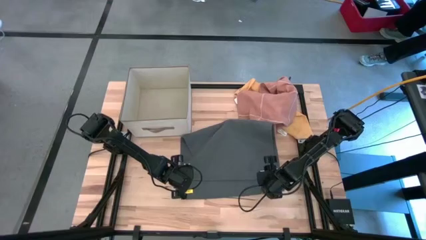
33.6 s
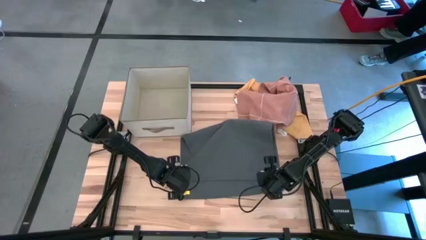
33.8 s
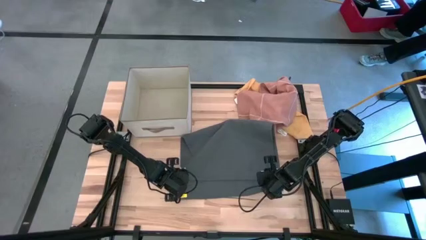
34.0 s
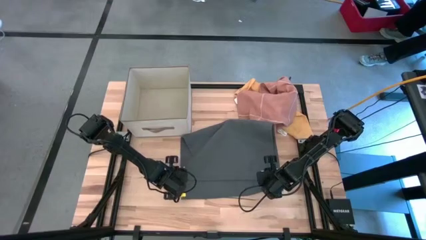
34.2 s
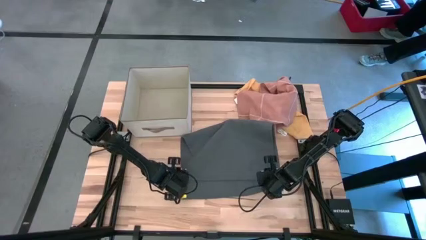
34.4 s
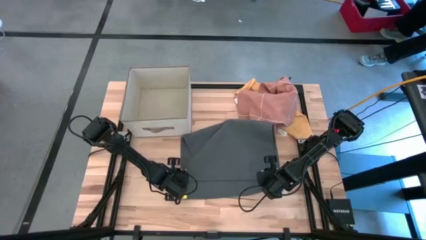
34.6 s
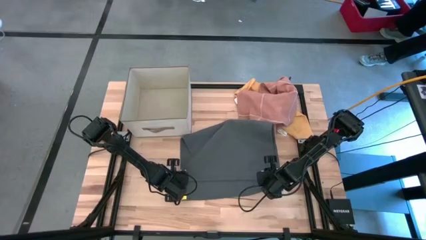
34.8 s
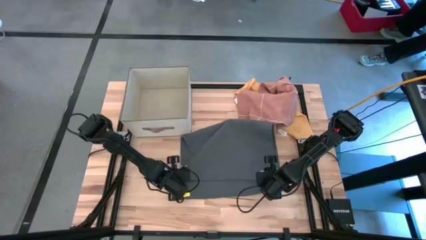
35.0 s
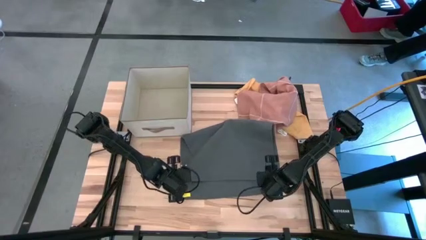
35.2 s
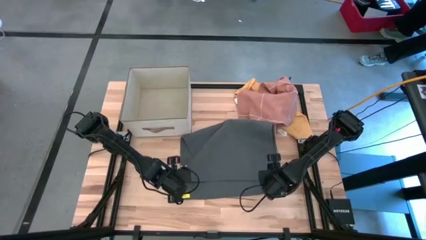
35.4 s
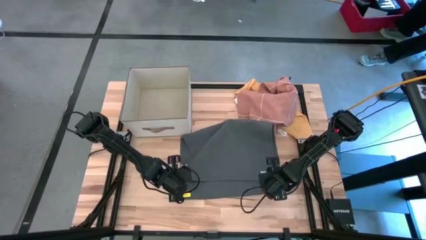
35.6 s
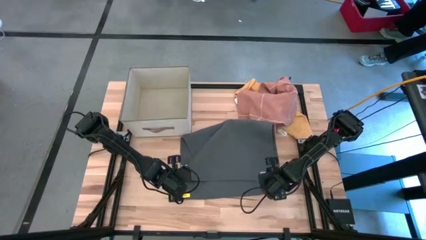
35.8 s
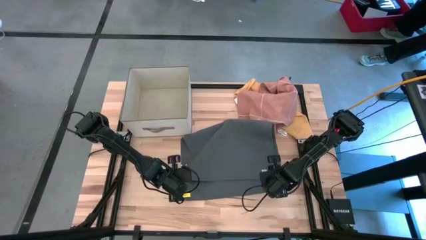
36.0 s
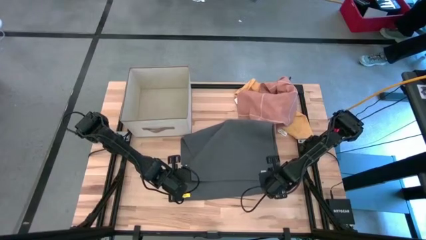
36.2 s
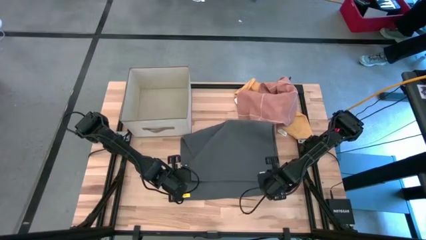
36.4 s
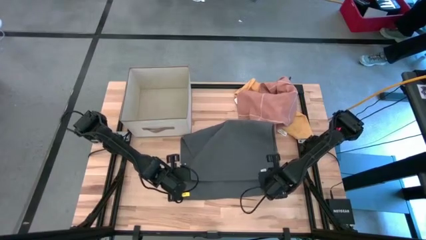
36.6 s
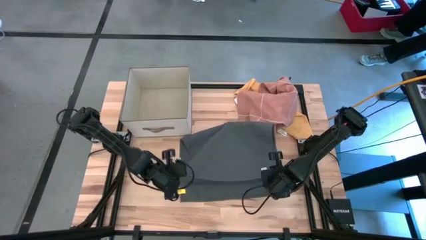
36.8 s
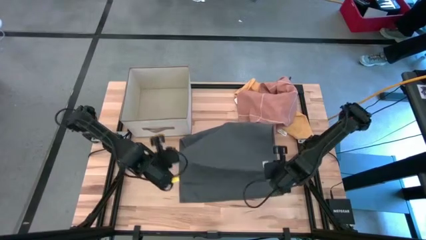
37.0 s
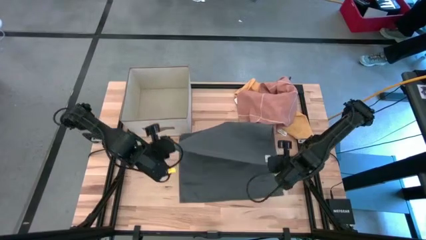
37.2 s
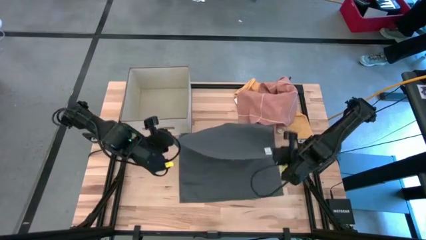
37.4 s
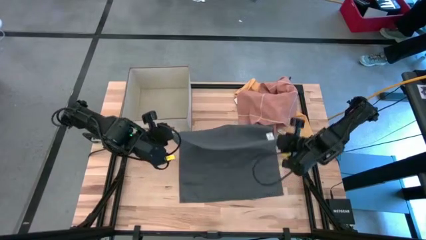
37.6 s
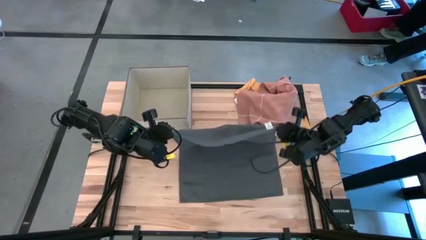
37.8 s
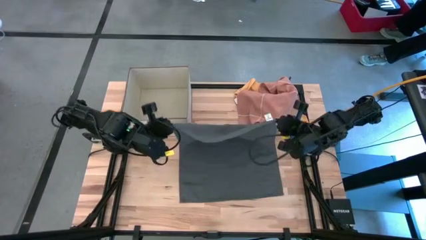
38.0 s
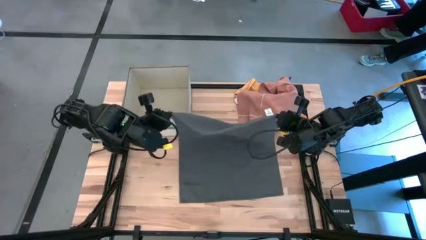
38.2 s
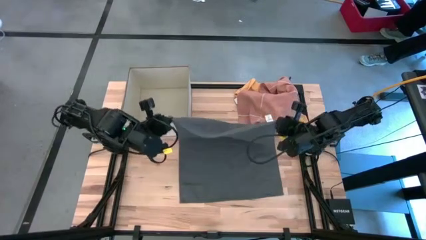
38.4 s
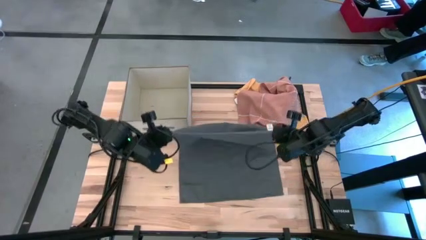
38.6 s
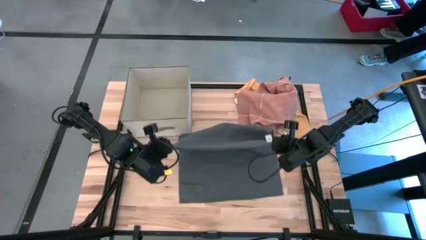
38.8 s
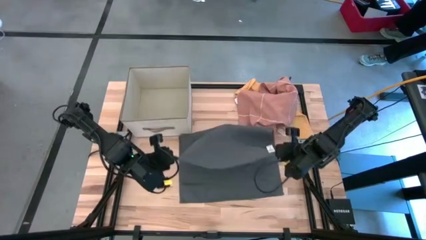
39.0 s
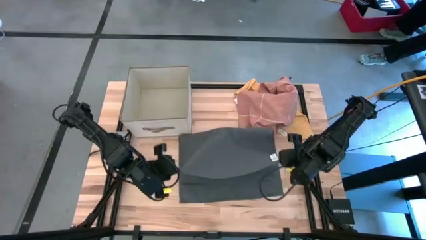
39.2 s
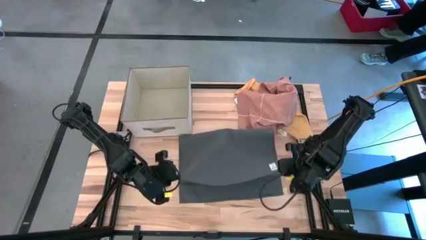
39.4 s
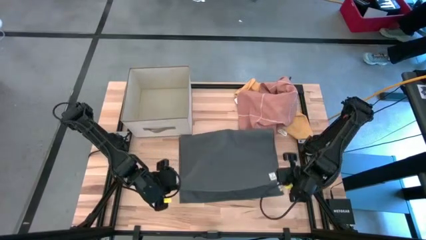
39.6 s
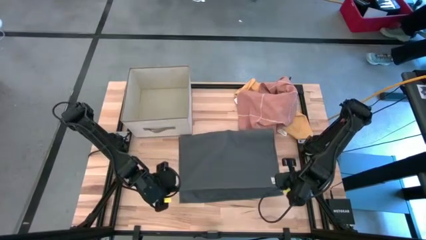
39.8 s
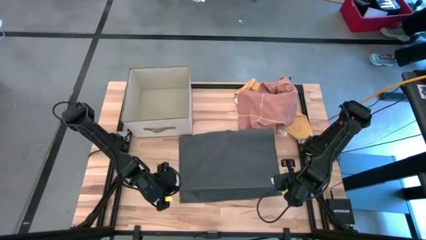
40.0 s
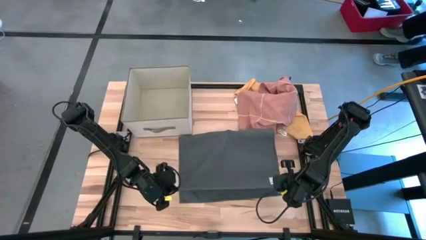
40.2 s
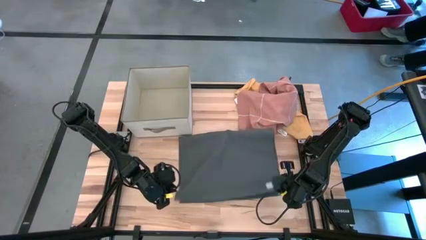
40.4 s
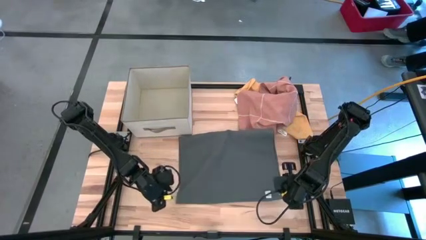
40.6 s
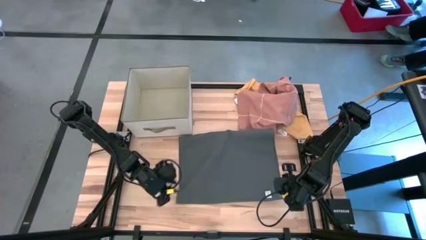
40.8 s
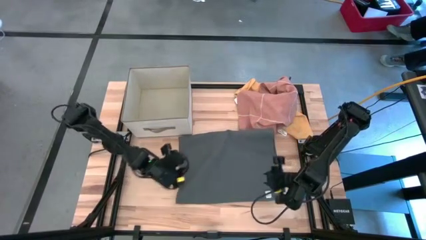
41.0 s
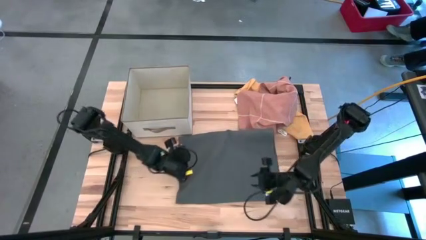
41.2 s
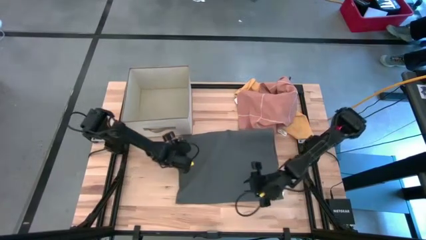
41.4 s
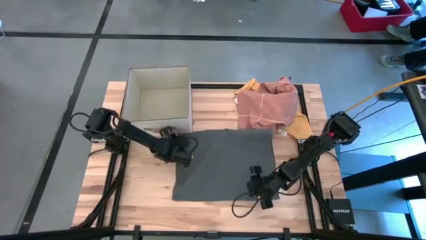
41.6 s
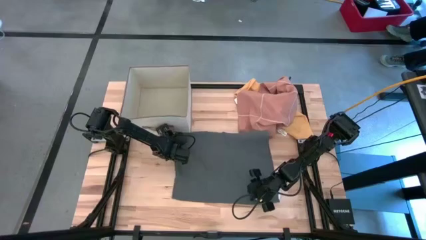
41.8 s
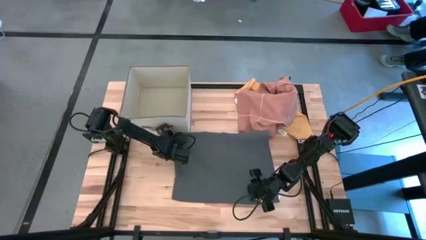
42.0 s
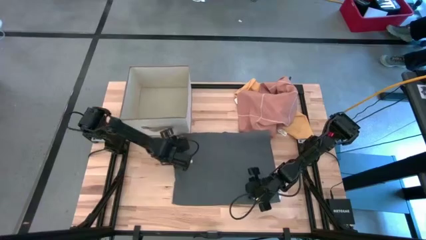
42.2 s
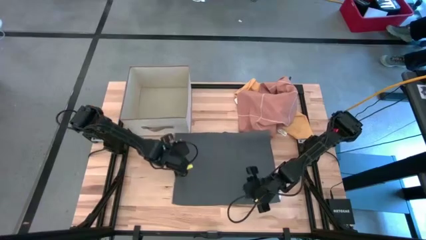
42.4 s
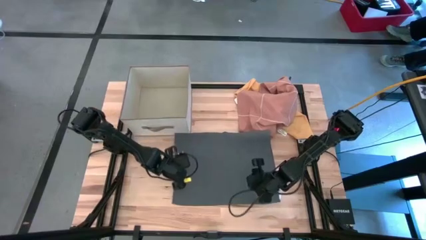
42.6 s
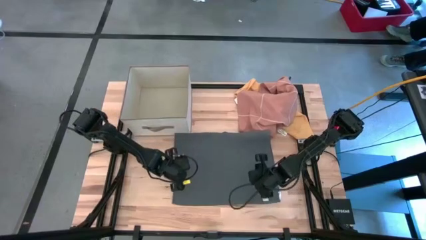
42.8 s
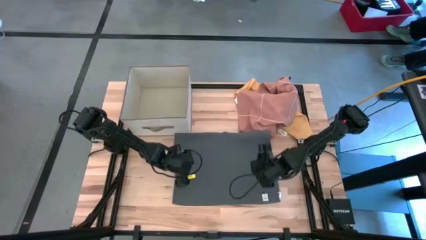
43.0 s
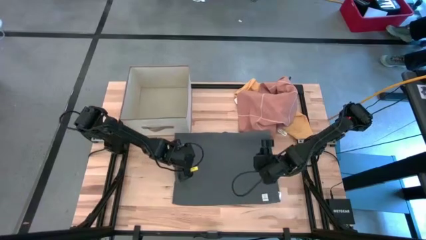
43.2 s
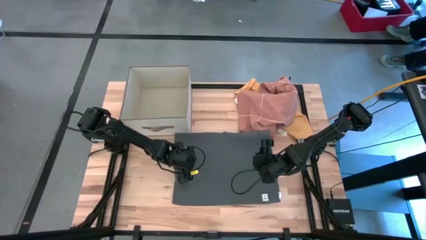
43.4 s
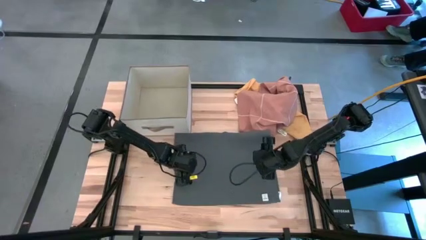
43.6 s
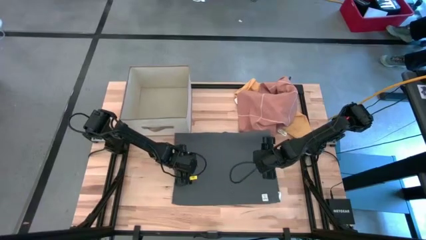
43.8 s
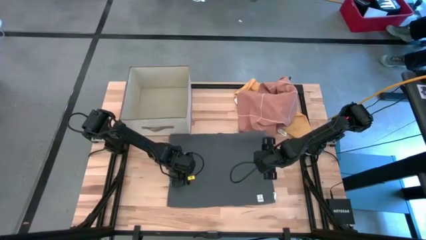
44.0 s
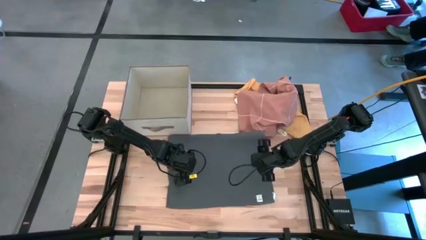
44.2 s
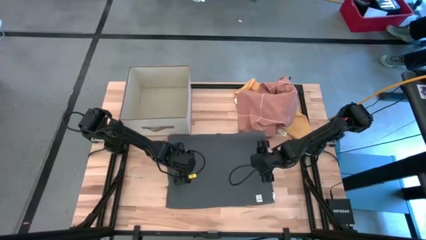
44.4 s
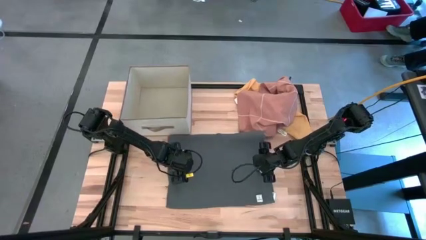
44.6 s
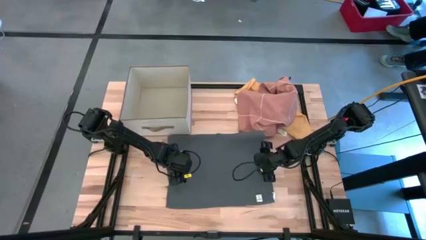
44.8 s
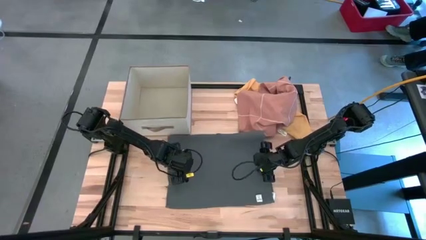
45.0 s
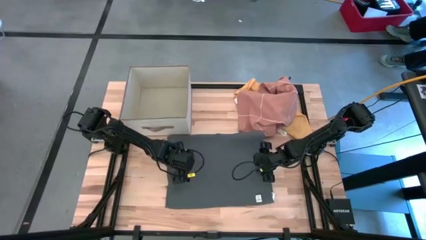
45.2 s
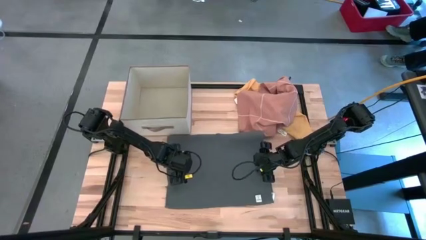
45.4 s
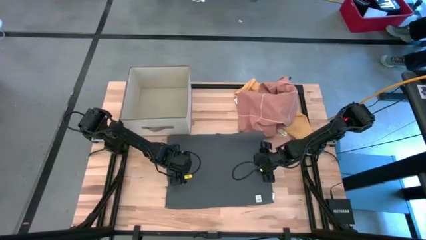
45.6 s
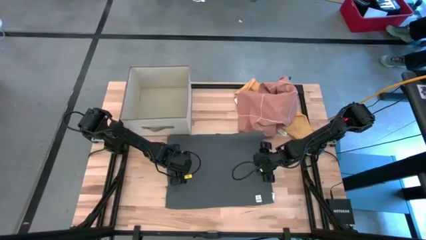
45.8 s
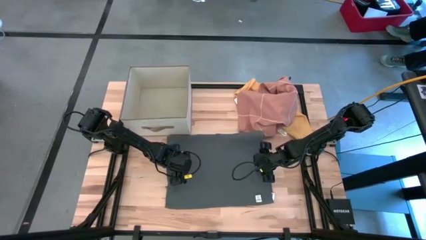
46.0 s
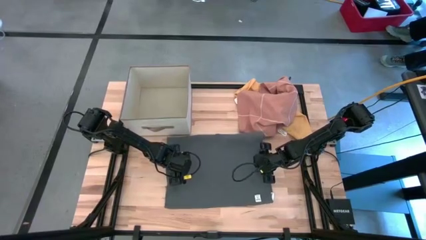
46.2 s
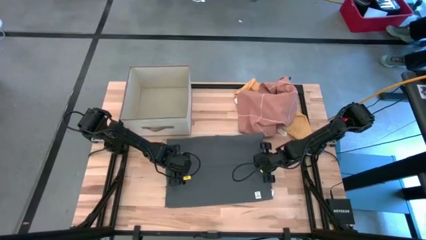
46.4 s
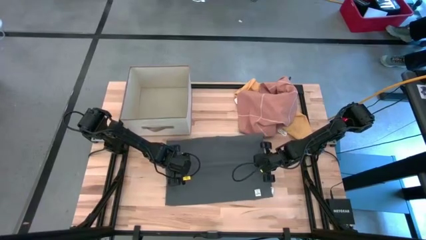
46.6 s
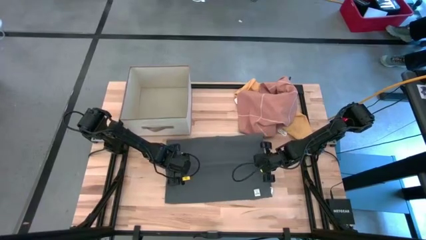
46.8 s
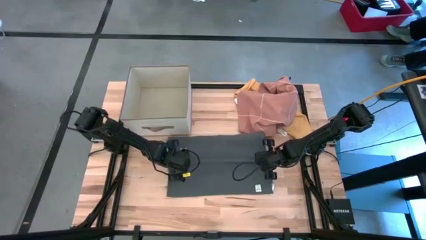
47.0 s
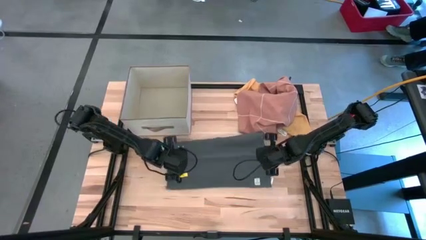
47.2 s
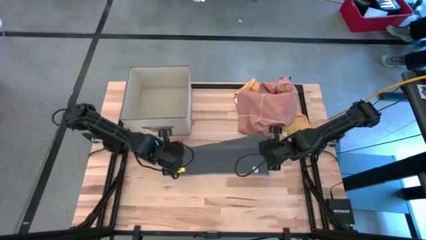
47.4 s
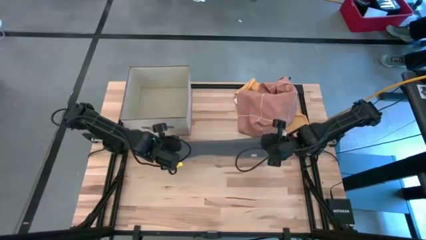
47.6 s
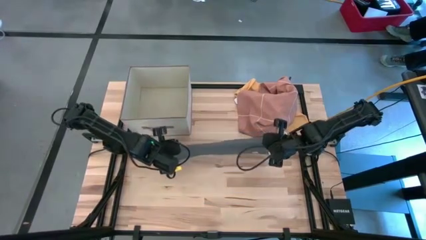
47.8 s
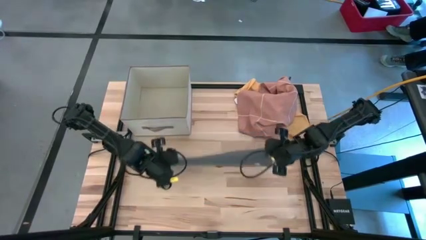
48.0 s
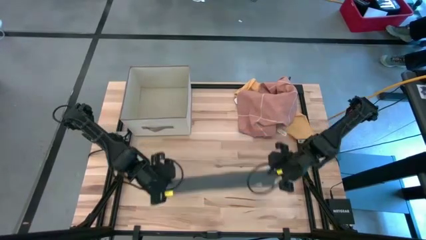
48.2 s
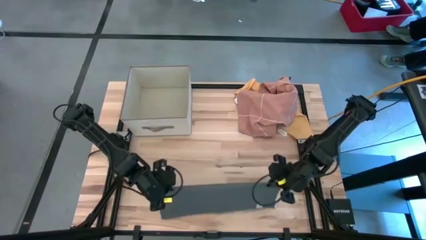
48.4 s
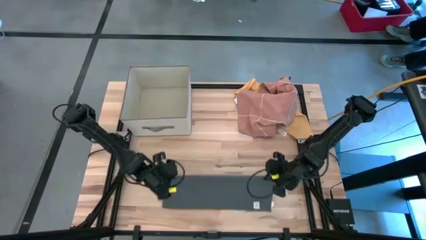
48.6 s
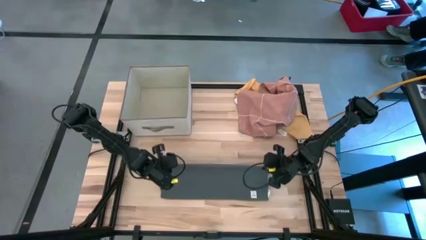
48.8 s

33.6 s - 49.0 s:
Task: Fold towel
Fold the grey towel
